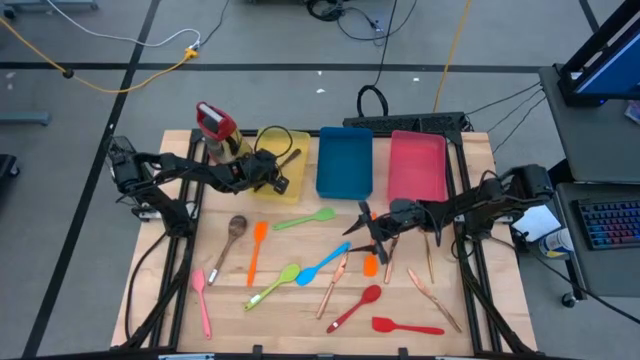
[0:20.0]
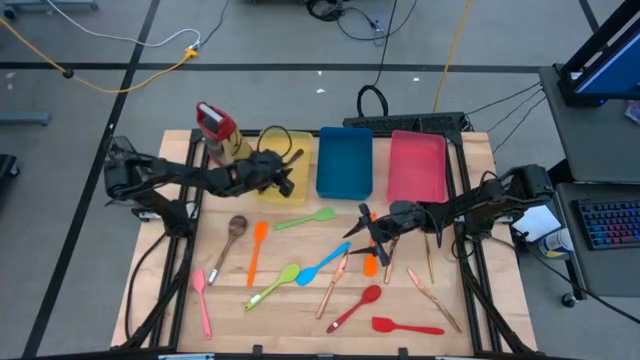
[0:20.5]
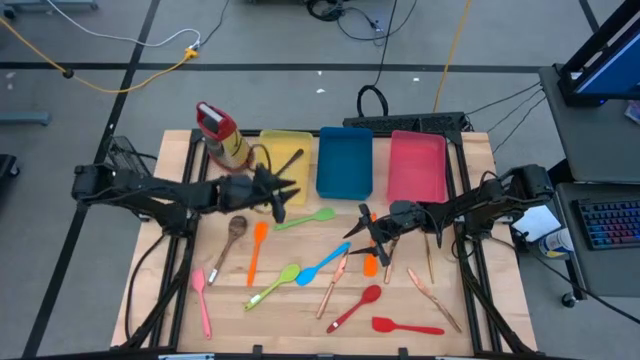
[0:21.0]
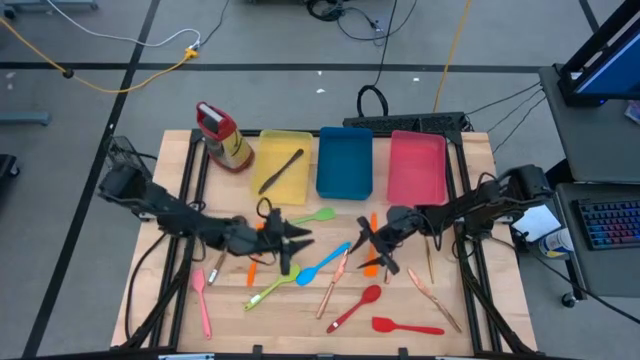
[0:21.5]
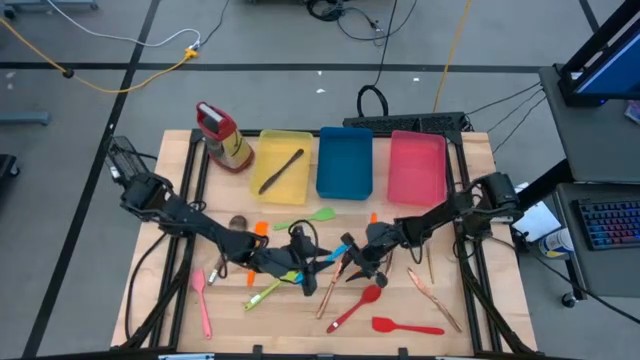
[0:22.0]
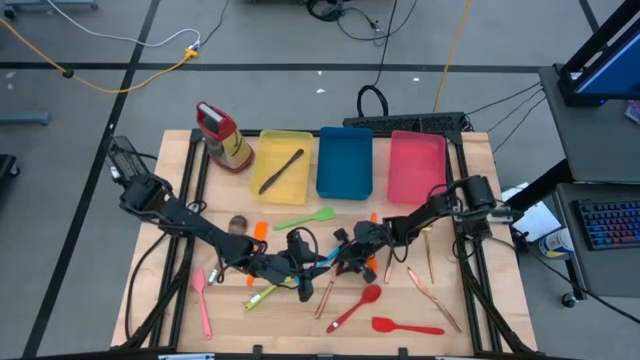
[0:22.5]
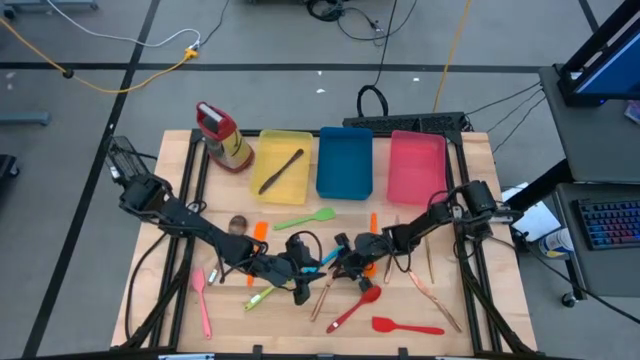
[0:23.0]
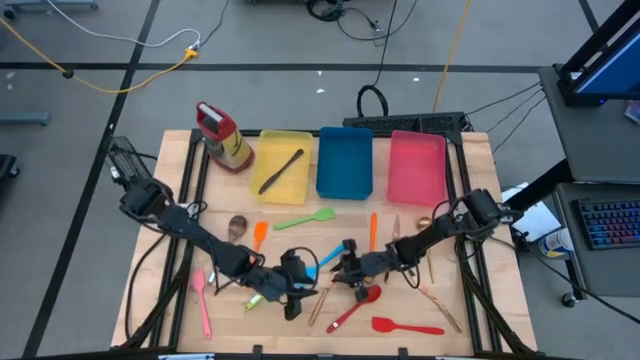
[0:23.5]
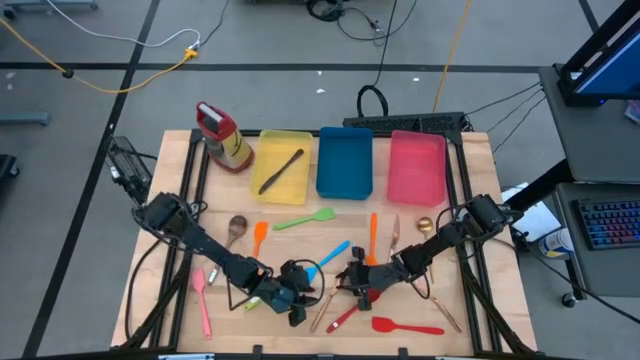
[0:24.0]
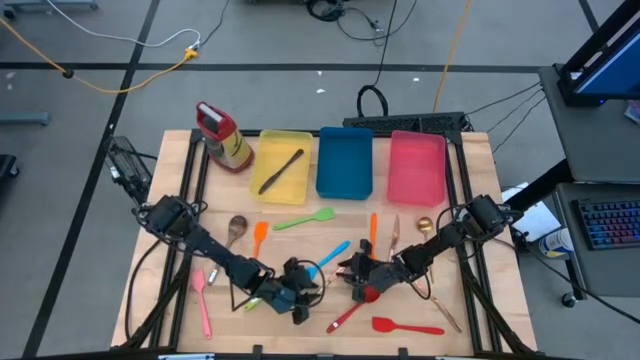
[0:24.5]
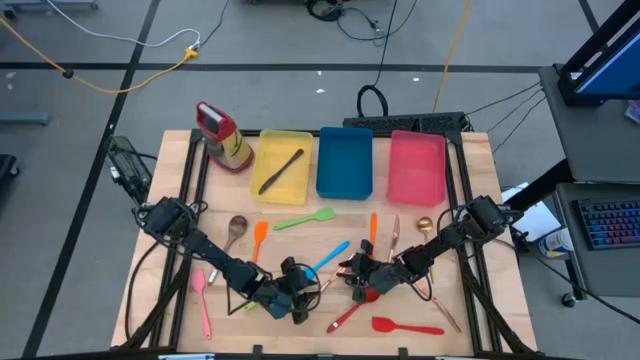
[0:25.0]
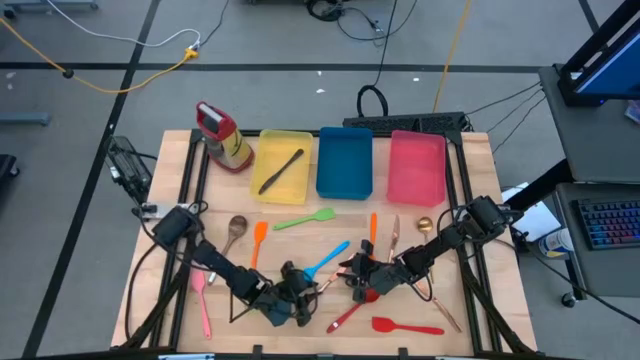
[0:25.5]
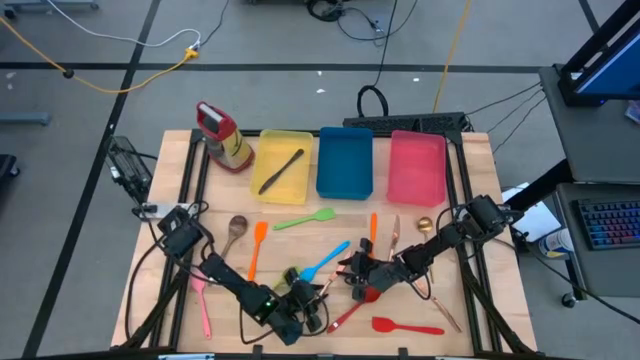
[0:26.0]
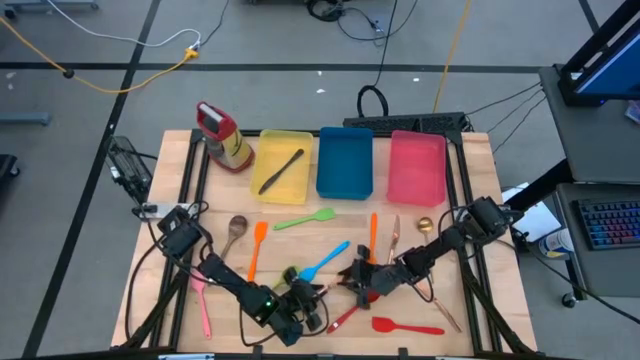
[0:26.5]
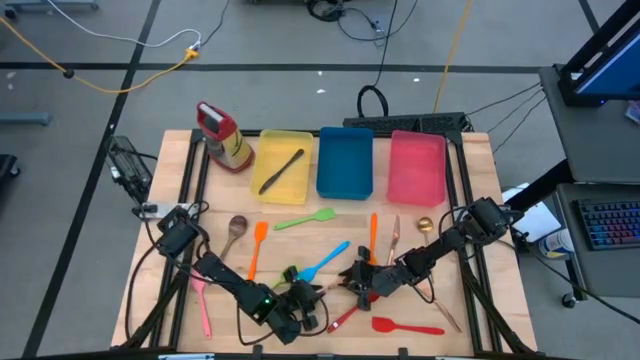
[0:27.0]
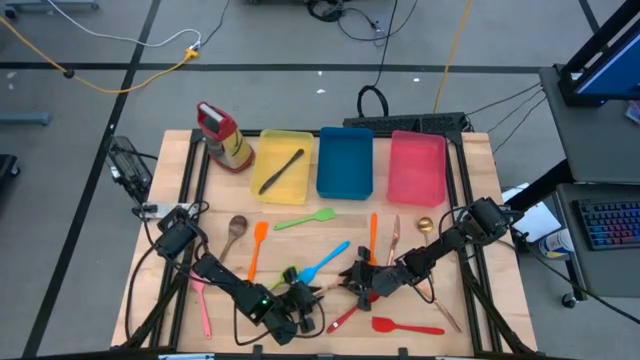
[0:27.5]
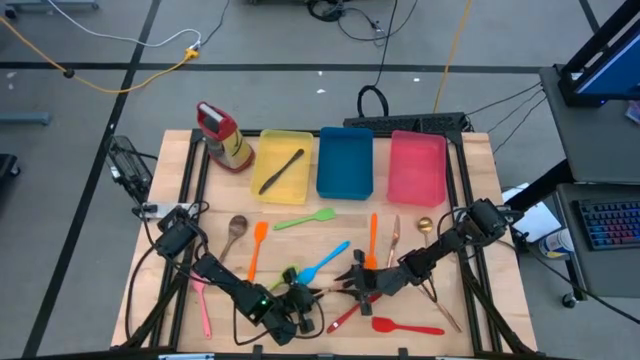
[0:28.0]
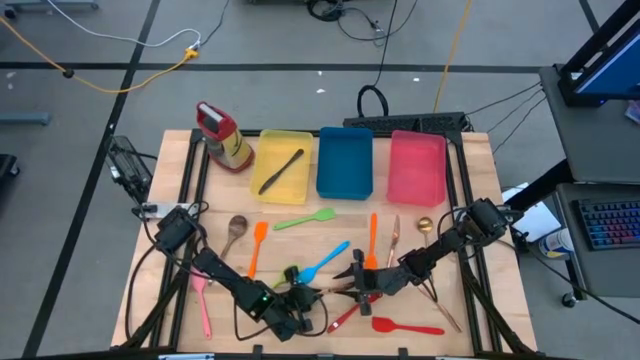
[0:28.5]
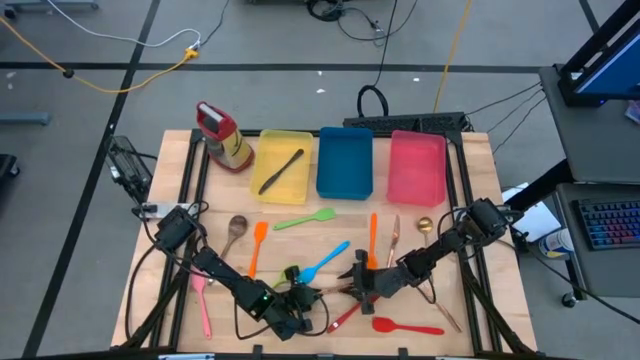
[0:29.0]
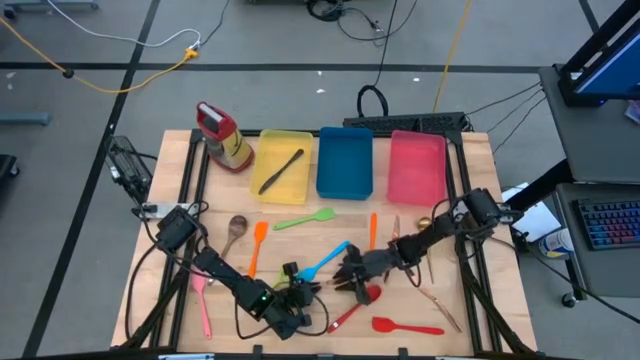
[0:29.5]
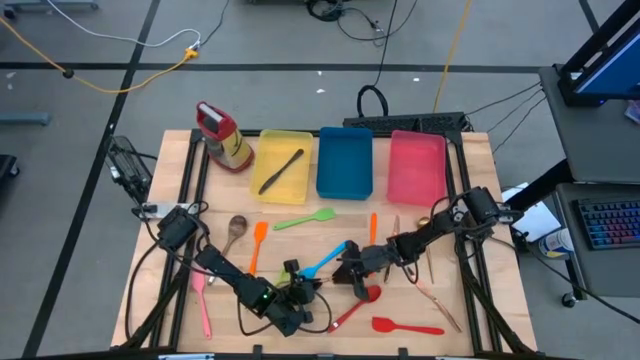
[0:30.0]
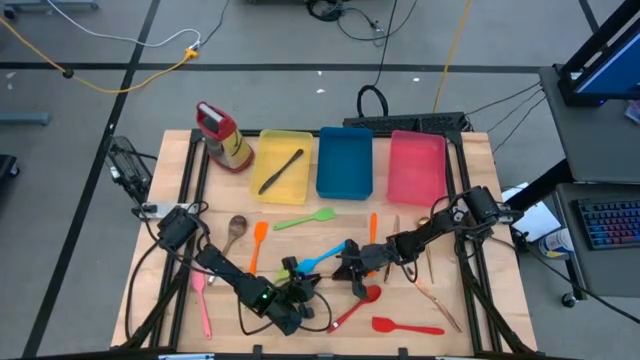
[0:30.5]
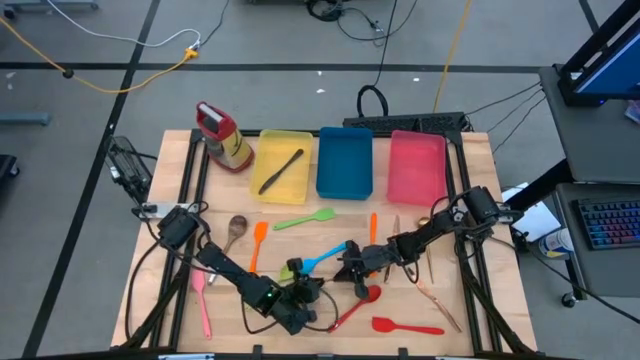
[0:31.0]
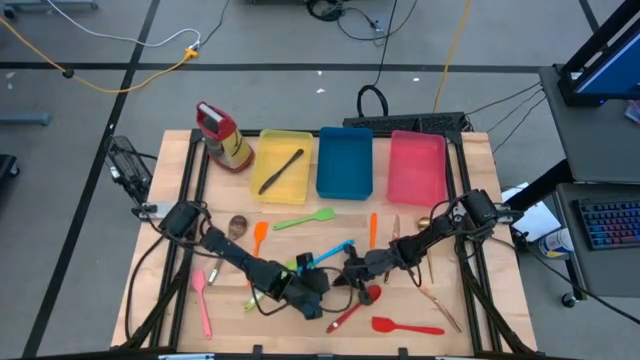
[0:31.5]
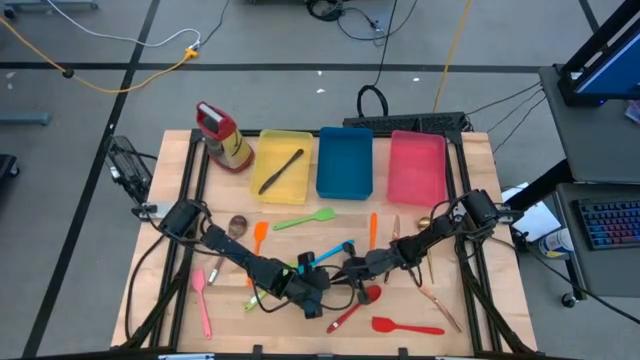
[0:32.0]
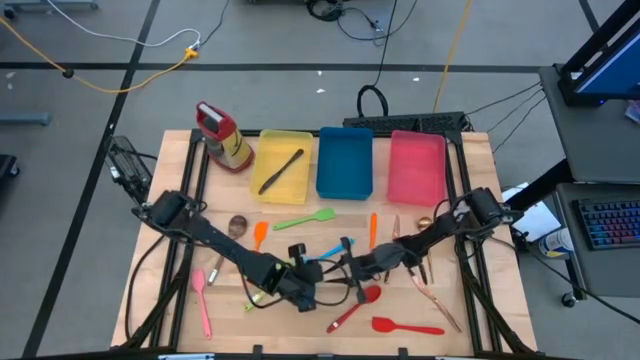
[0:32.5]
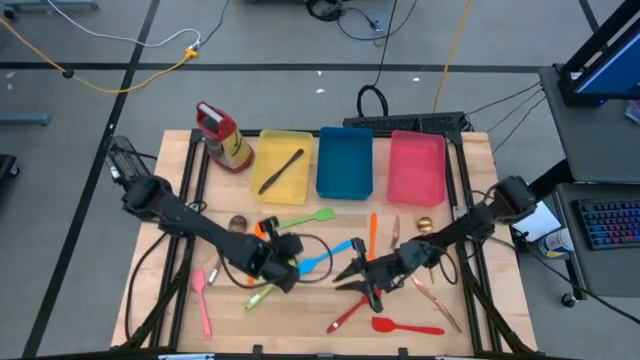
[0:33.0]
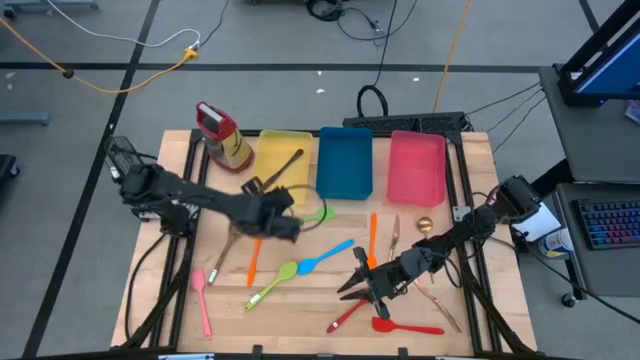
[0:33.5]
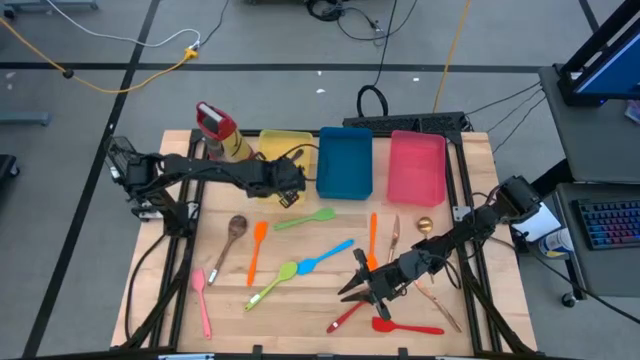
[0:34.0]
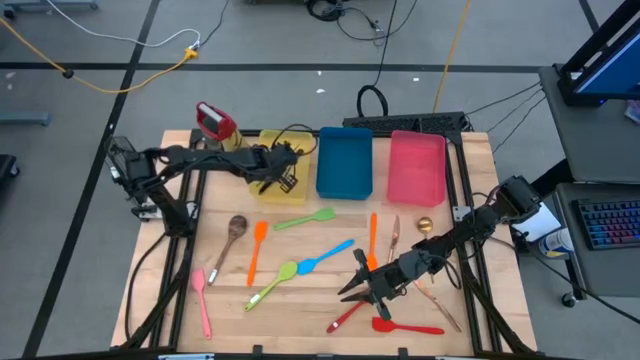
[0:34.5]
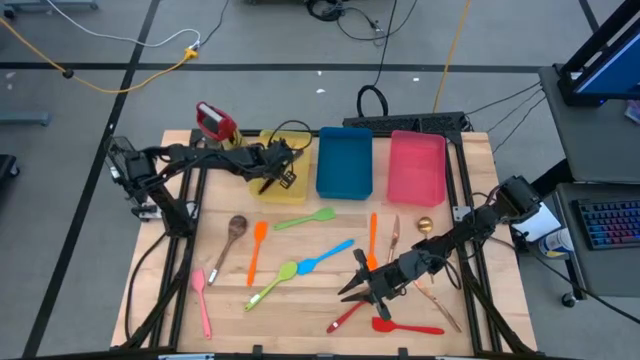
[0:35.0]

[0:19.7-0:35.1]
Task: Pick & Place Kitchen Items
Put the bottom left bronze knife into the yellow bin

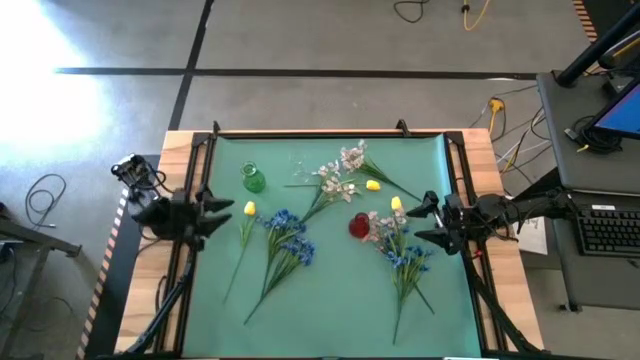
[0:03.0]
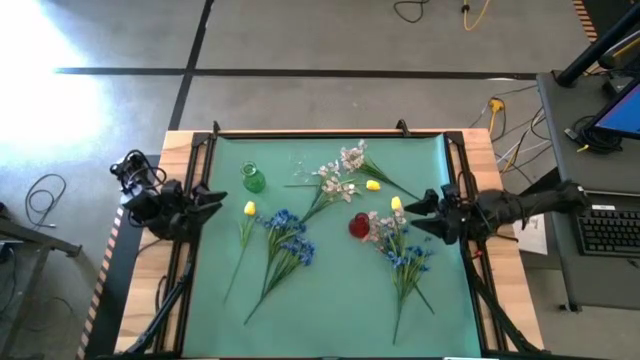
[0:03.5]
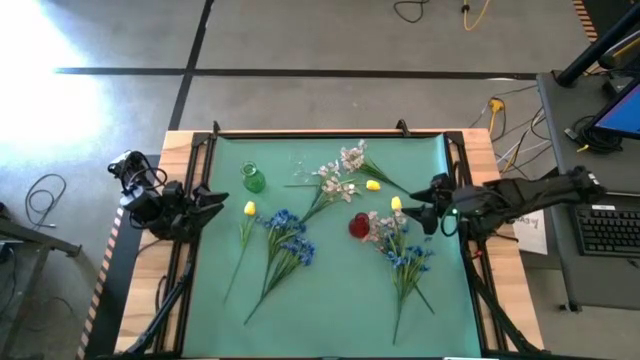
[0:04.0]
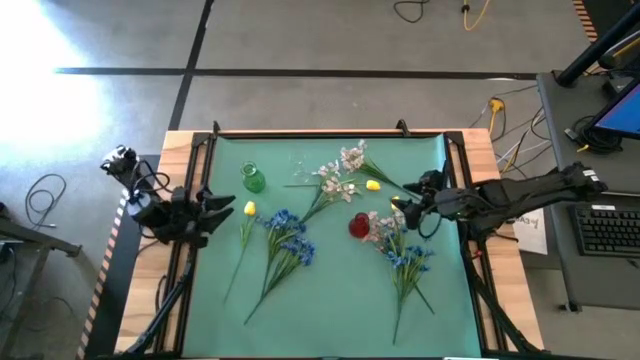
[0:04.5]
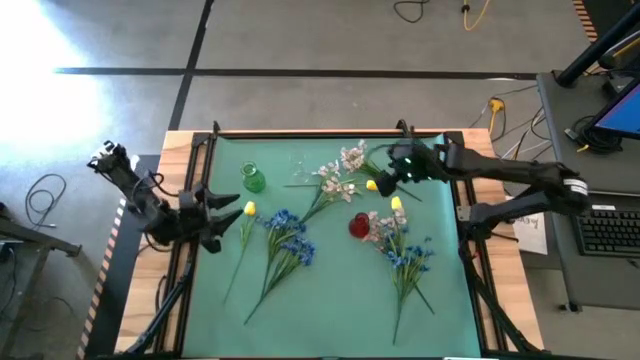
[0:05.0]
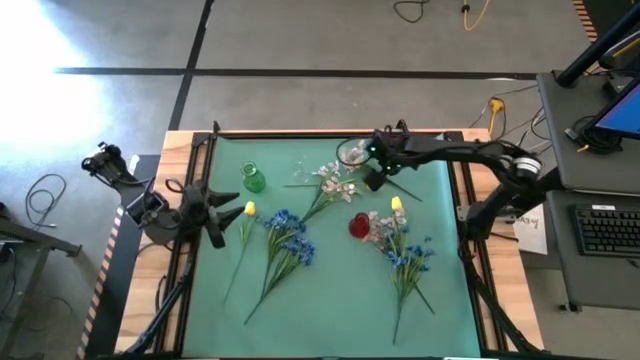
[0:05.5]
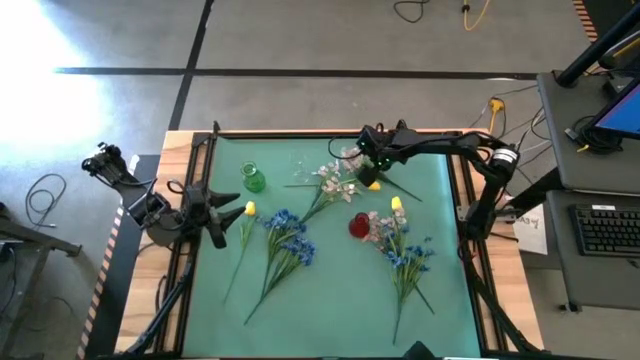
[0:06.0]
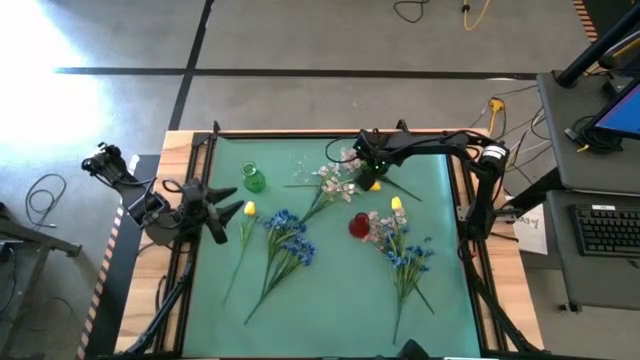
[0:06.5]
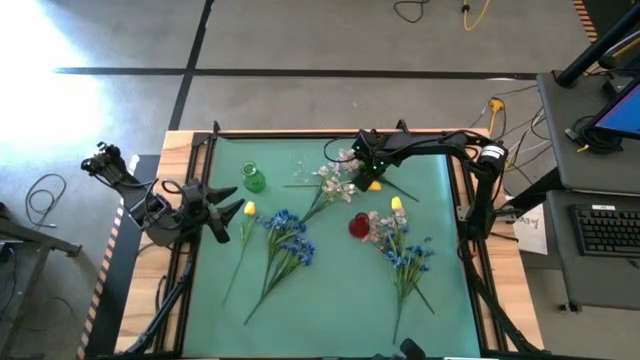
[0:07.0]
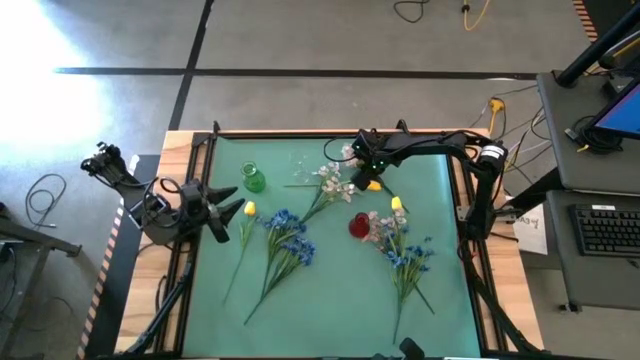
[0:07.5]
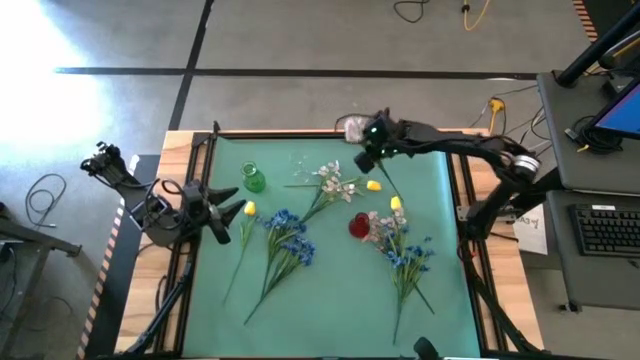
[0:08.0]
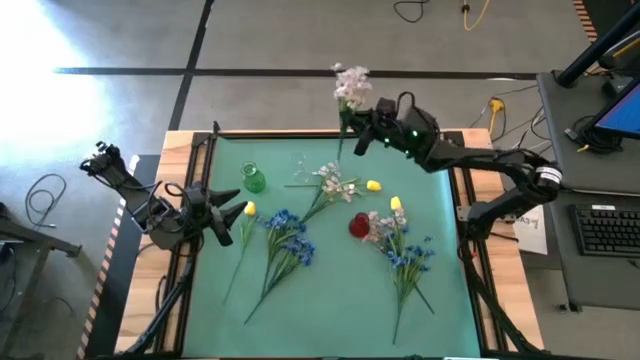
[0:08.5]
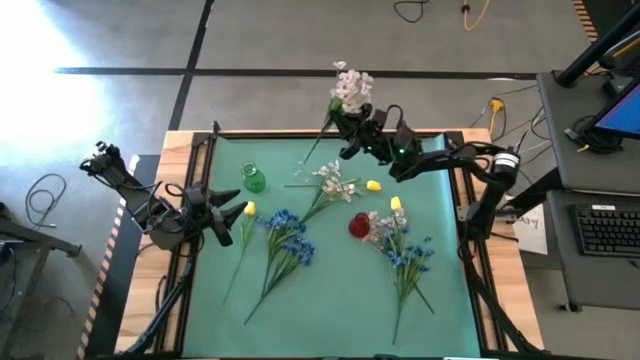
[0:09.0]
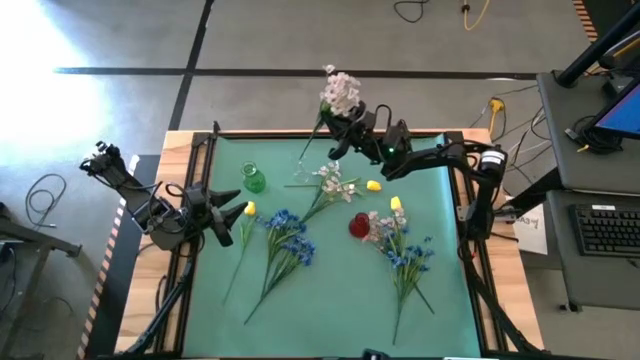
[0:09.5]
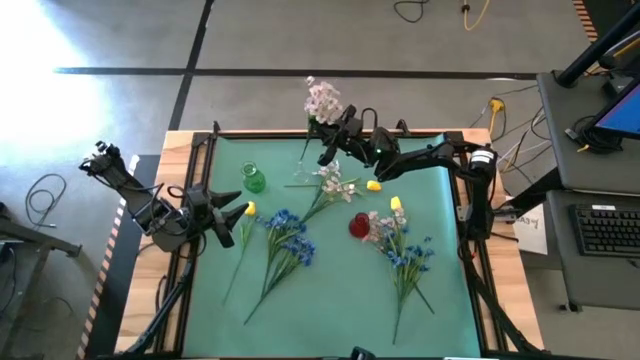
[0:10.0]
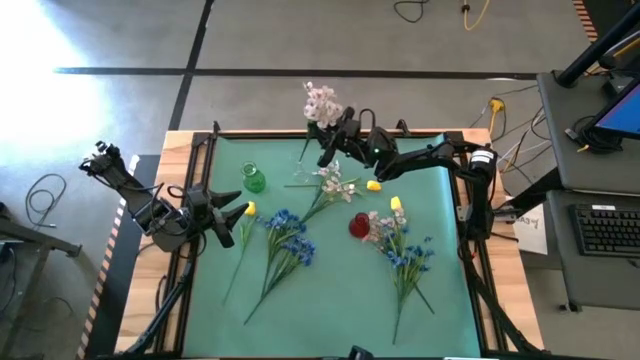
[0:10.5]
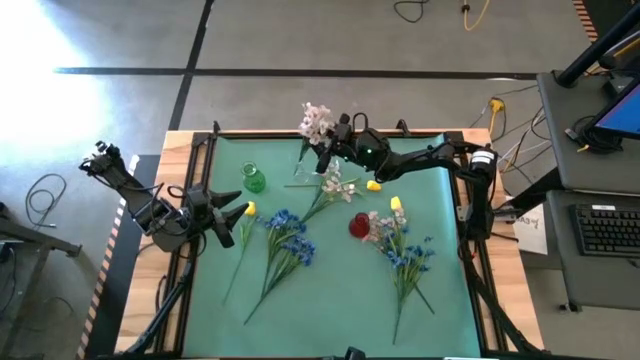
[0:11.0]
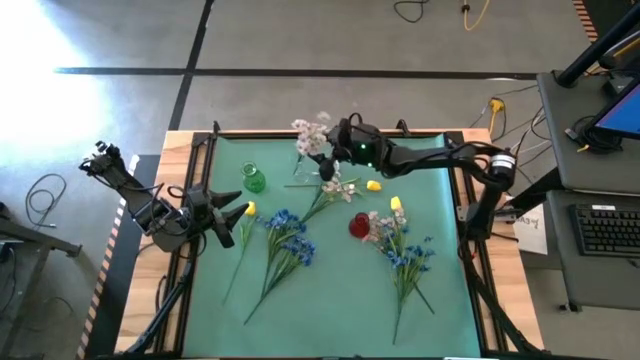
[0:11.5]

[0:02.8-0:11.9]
Task: Sort flowers into vase by color
Put the top white flowers into the transparent vase
